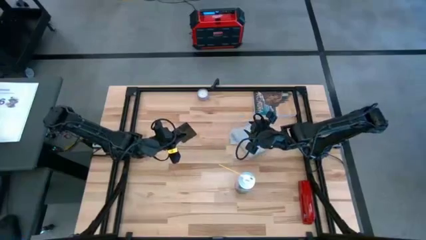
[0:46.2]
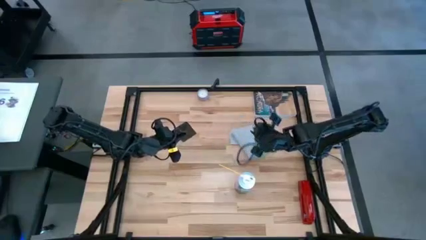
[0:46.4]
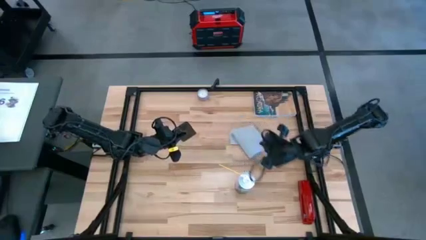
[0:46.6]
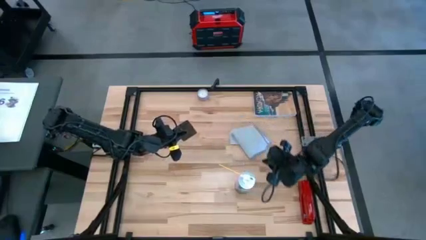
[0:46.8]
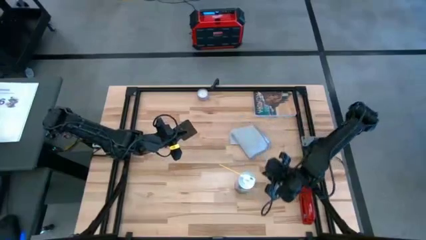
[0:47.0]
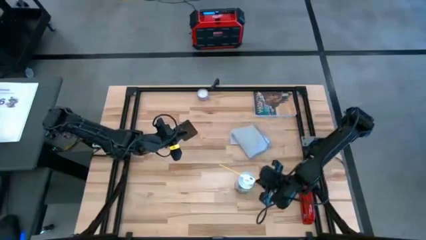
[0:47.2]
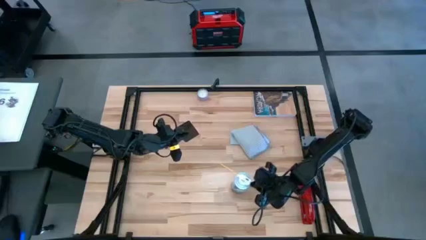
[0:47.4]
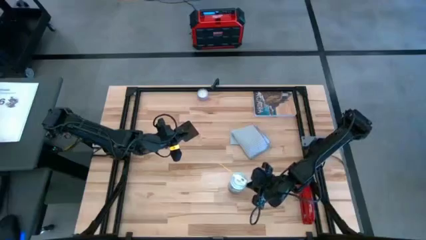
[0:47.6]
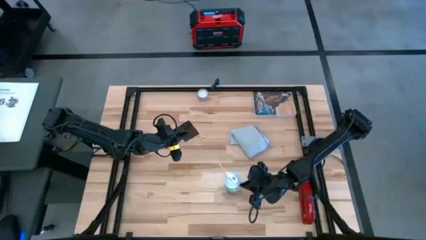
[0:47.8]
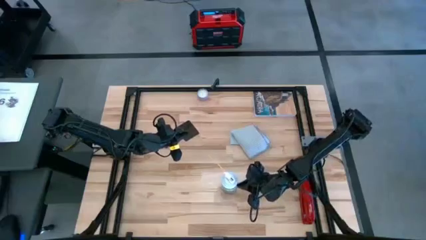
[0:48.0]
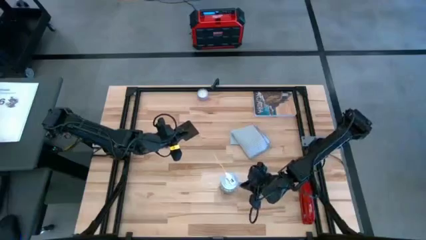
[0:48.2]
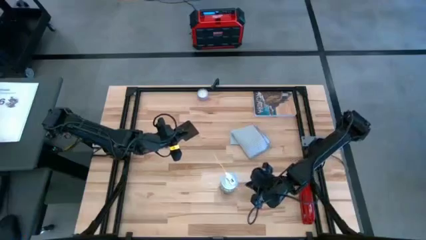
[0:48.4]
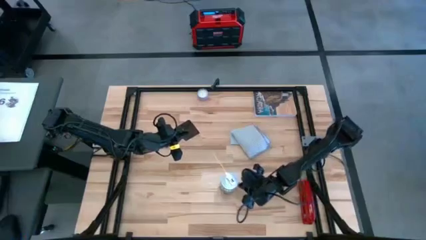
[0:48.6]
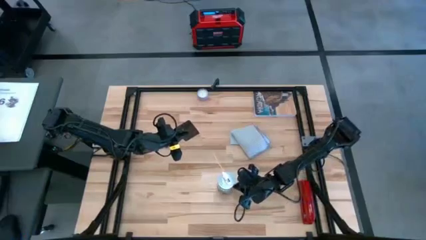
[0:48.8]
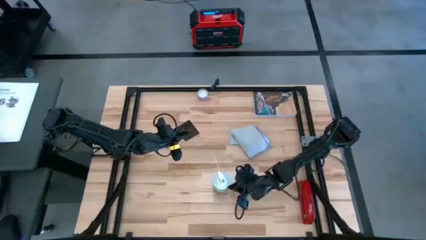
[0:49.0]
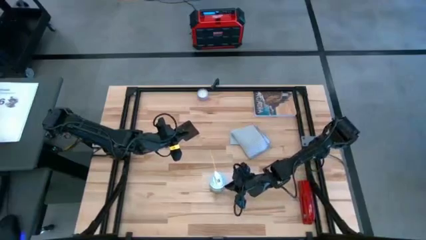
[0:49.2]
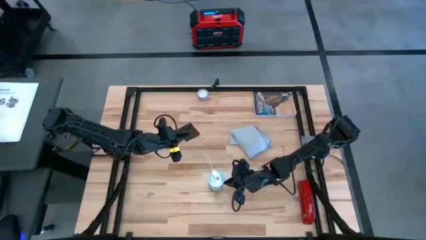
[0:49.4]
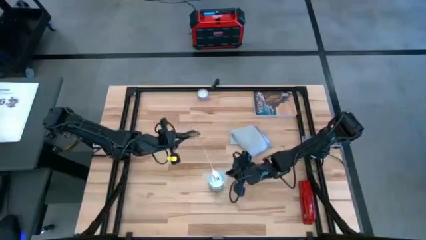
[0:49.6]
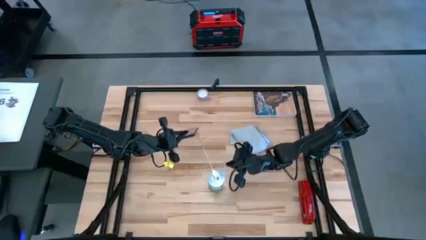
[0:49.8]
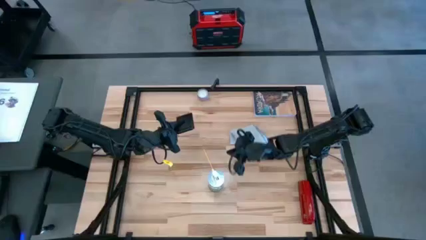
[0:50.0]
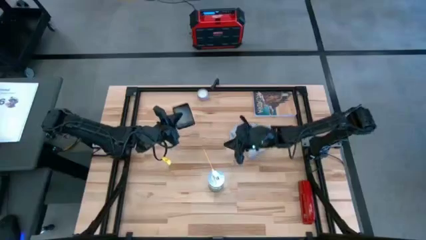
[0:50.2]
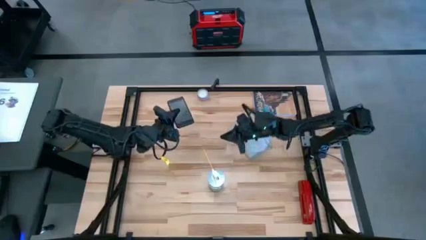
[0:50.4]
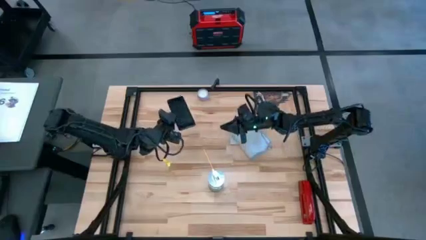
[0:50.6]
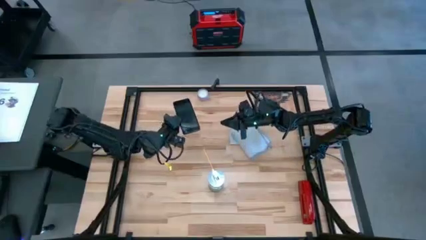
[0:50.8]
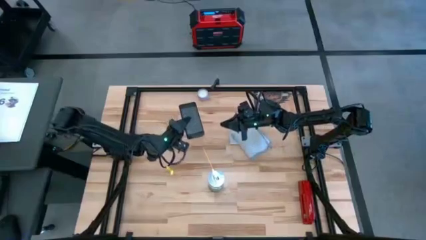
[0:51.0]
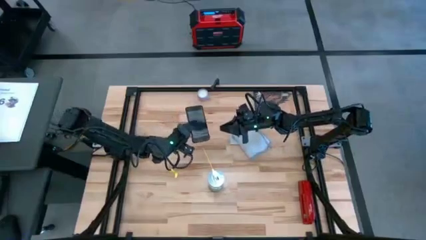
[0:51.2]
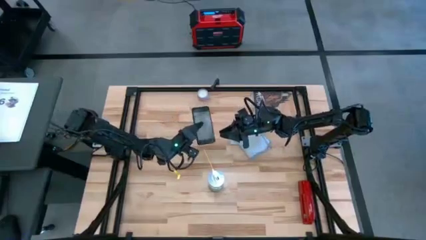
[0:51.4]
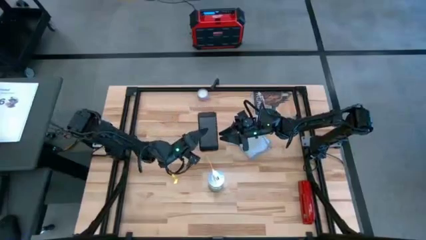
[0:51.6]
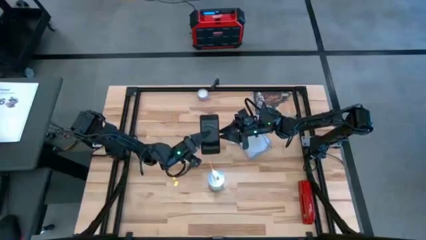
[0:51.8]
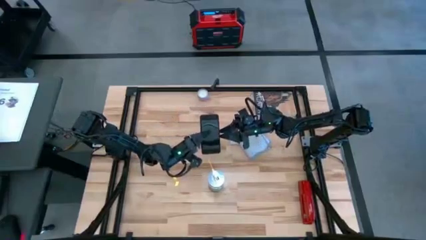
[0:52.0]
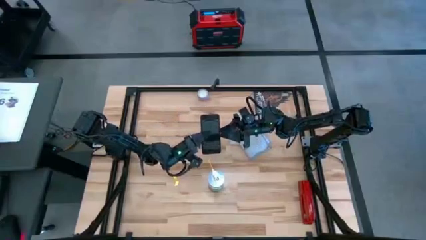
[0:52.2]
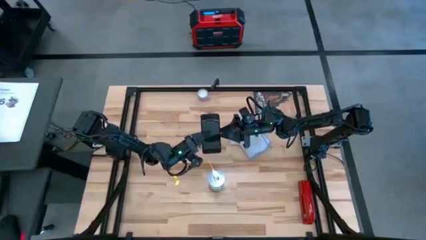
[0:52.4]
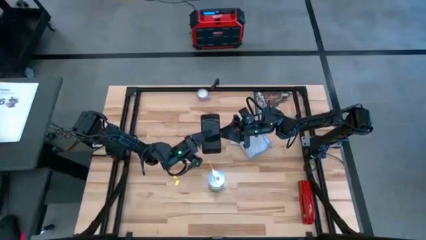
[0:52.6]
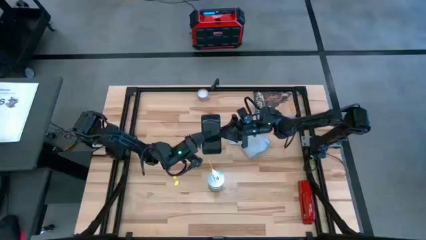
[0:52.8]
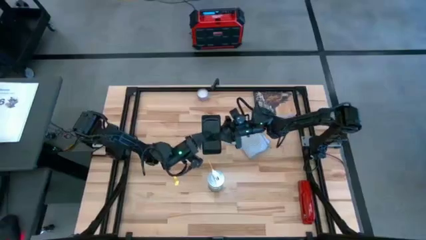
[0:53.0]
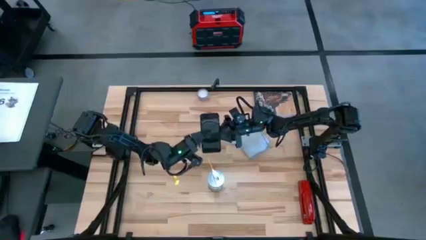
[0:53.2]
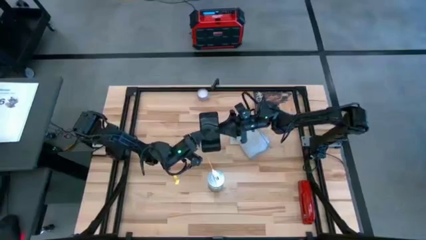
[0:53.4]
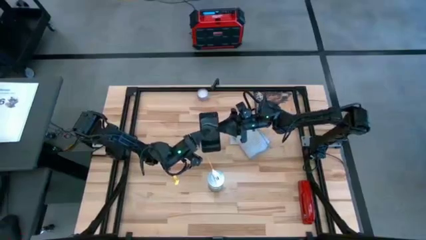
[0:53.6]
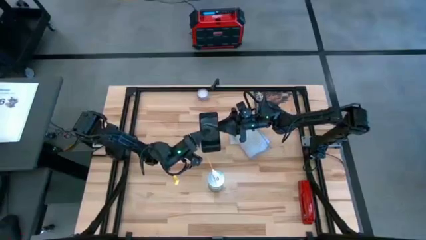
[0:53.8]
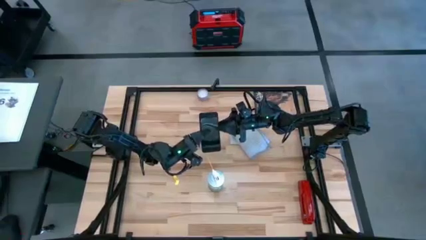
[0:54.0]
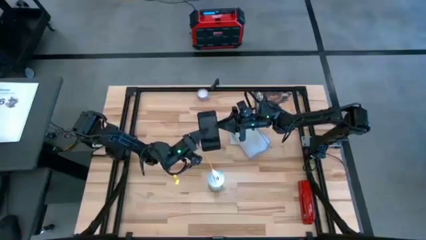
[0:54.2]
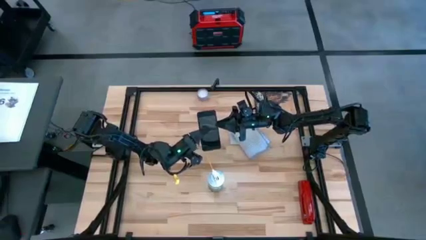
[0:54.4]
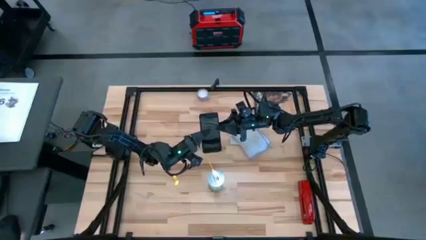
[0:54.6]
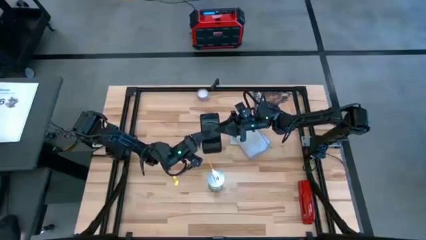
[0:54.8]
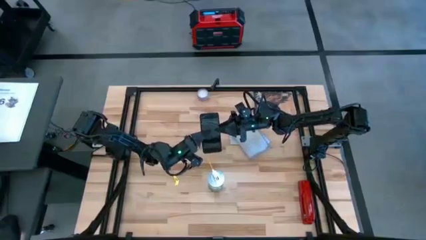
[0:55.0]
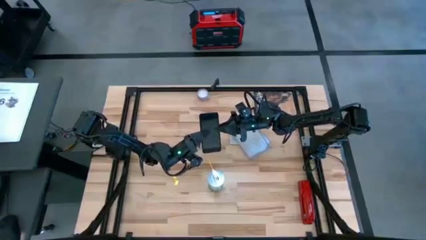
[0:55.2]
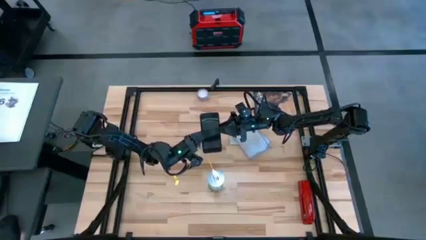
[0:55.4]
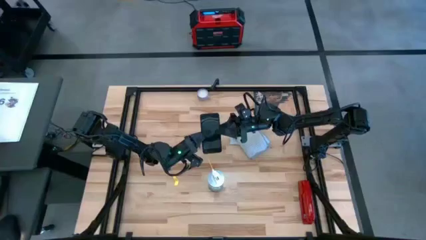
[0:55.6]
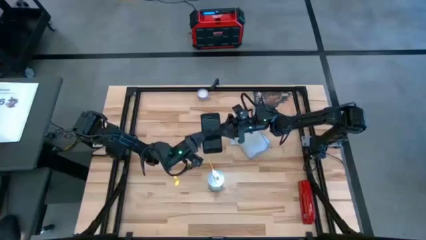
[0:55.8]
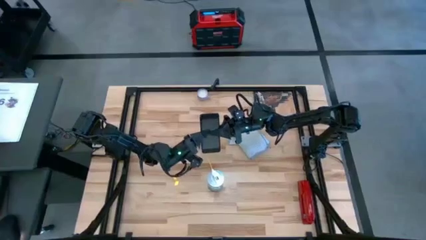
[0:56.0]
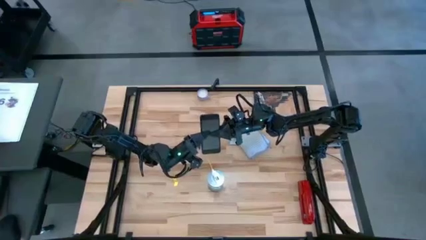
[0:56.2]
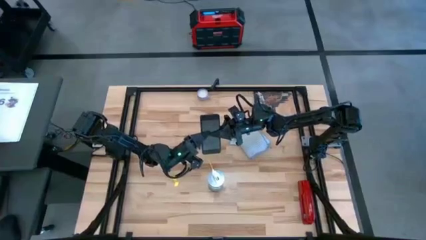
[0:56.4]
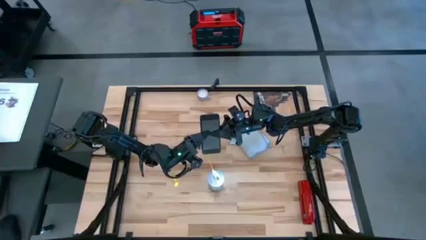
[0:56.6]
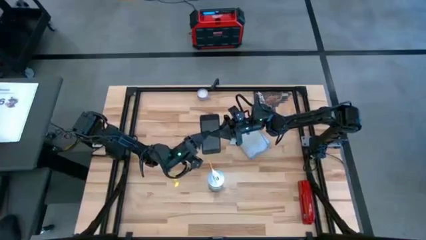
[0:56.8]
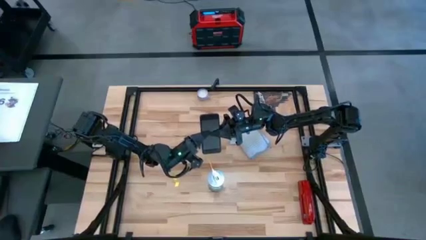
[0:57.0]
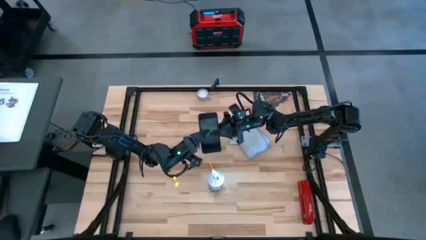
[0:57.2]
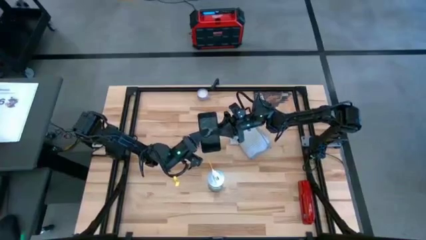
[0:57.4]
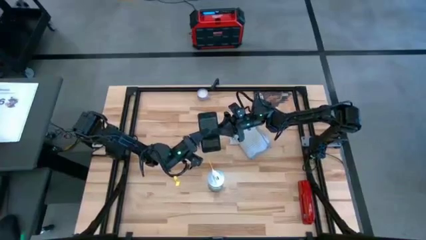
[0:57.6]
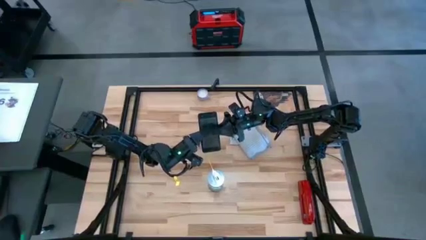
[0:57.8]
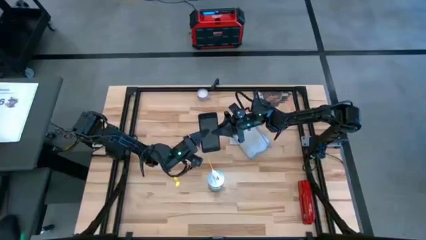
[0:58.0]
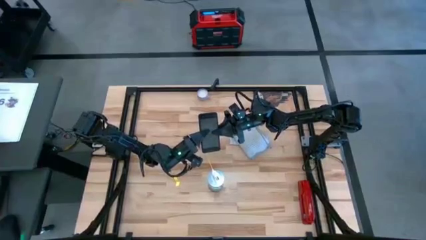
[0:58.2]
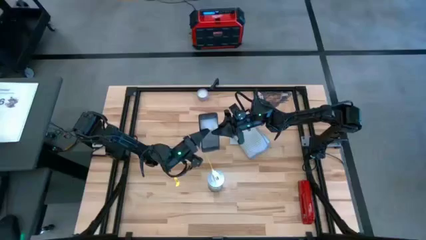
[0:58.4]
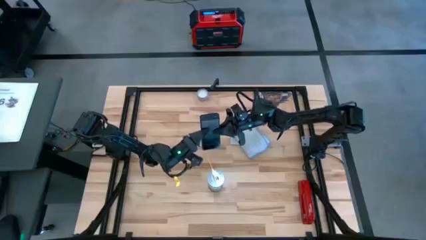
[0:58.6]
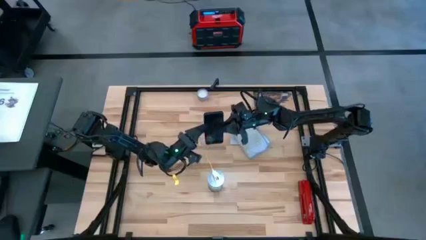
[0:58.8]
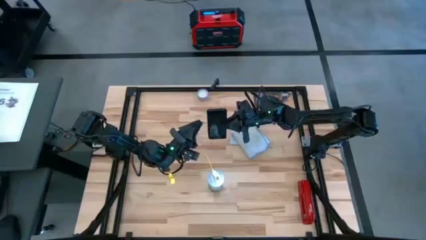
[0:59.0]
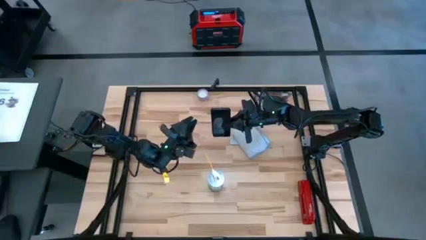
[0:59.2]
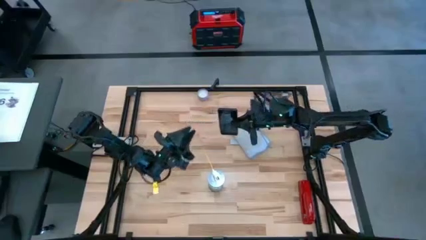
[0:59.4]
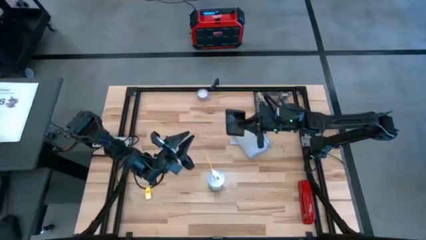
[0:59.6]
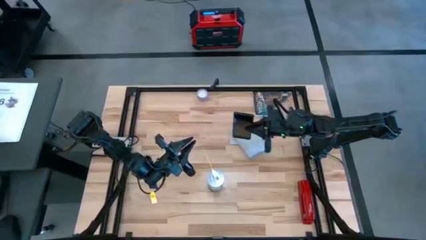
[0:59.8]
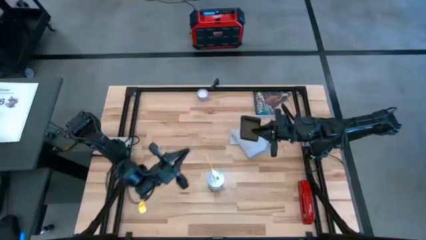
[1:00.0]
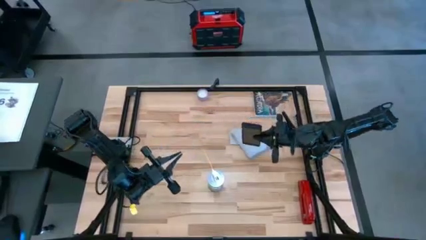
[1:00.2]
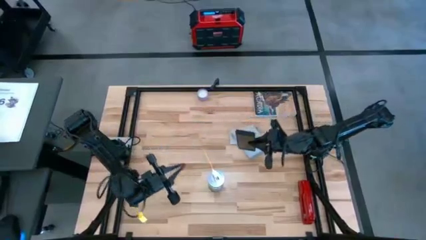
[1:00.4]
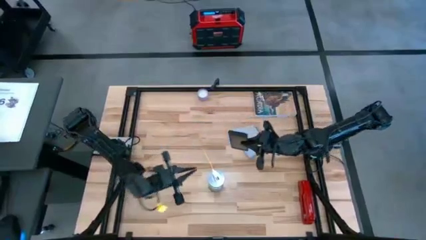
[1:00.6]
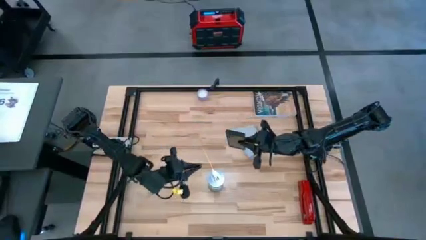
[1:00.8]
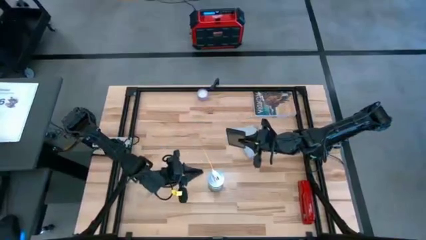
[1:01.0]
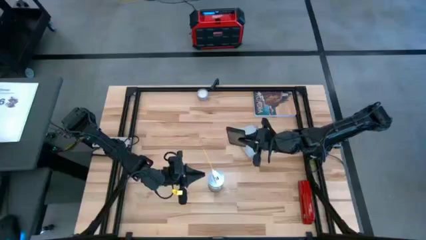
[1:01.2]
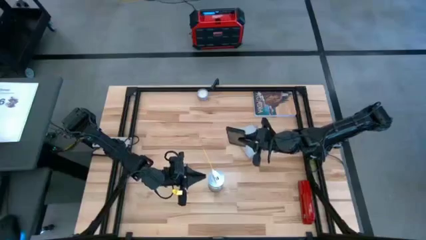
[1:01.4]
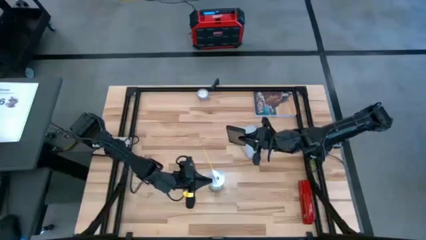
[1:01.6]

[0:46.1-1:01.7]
Task: Apply microfiber cloth
Spray the front of the cellphone with the cleaning bottle
